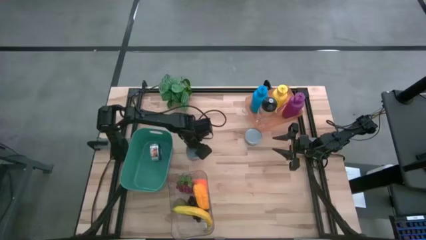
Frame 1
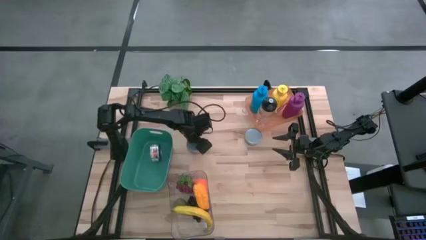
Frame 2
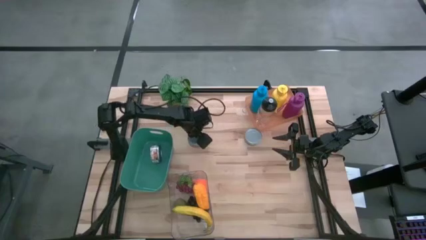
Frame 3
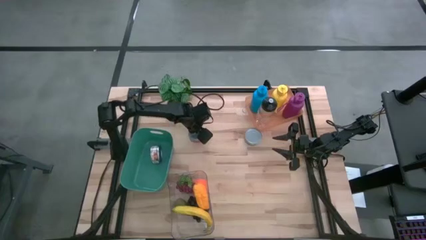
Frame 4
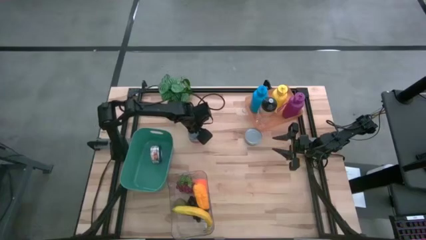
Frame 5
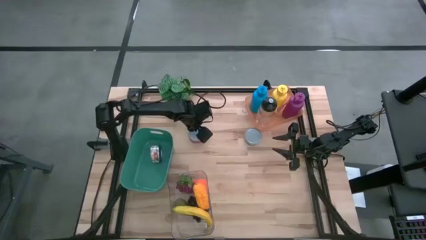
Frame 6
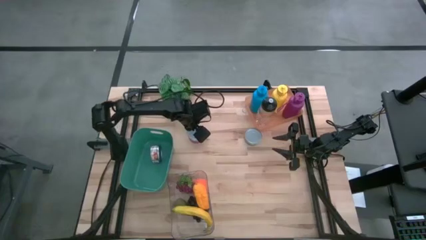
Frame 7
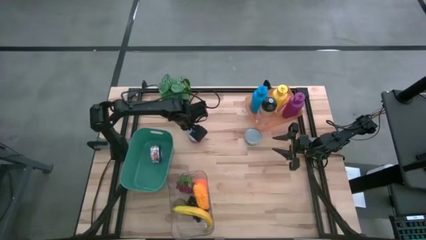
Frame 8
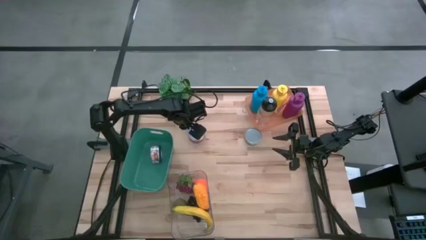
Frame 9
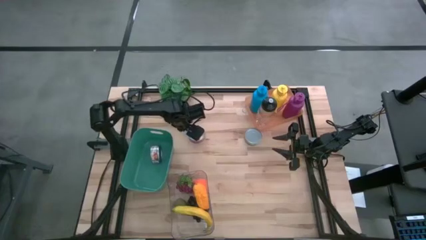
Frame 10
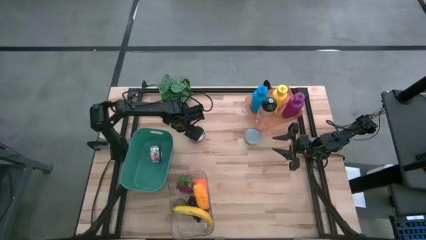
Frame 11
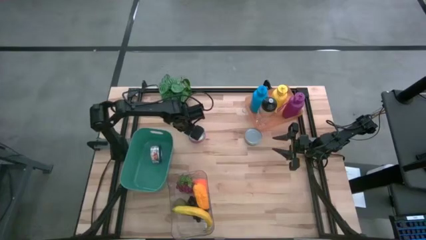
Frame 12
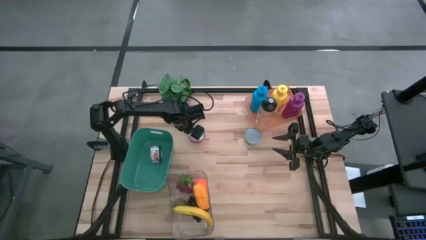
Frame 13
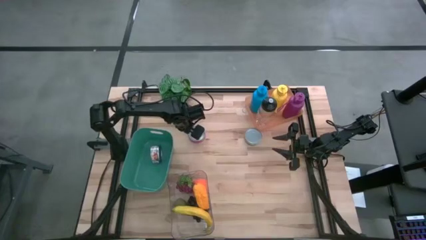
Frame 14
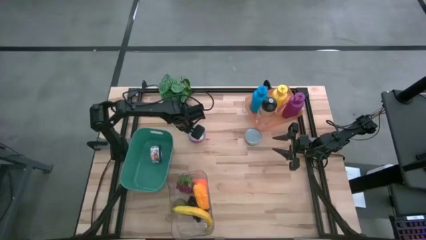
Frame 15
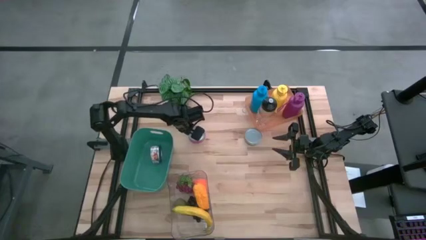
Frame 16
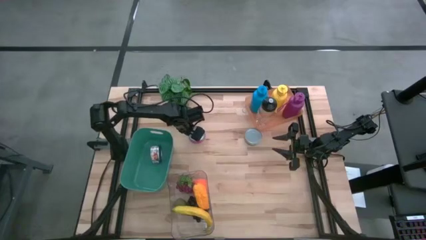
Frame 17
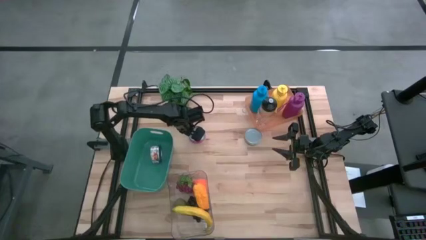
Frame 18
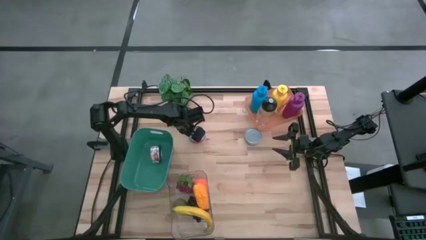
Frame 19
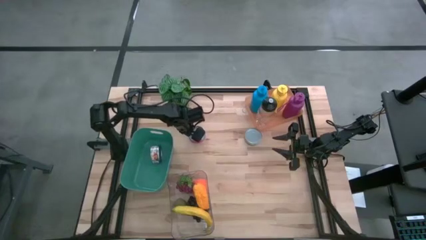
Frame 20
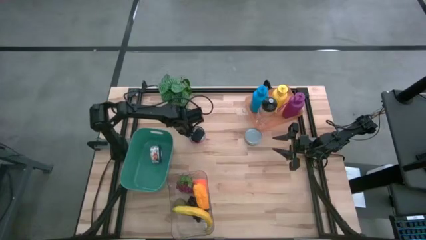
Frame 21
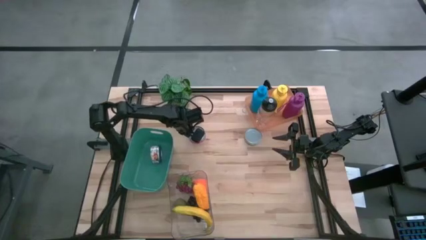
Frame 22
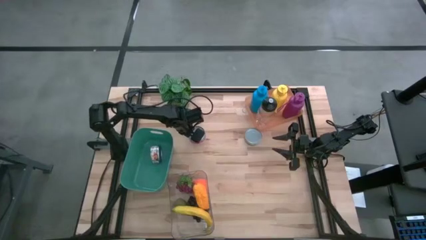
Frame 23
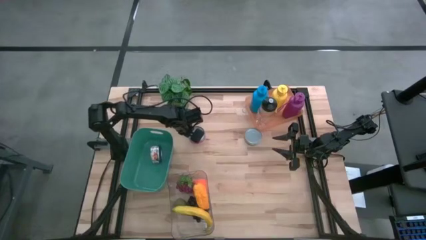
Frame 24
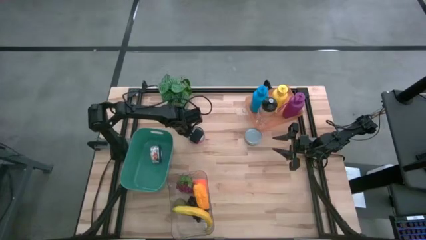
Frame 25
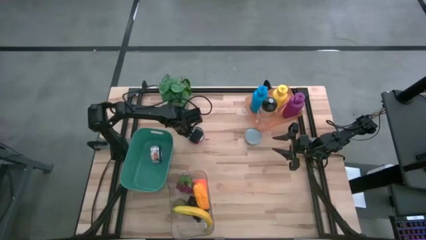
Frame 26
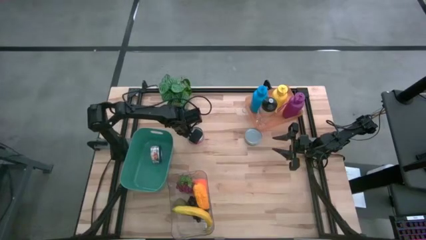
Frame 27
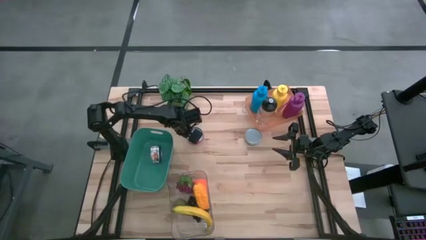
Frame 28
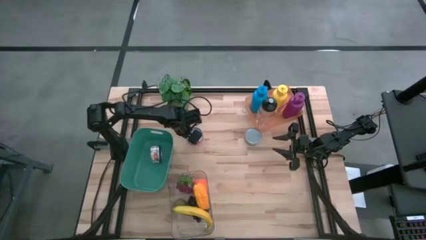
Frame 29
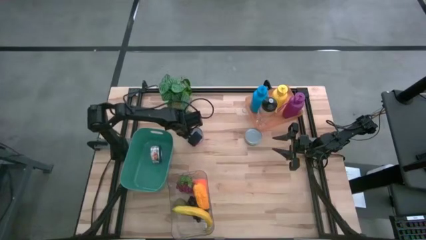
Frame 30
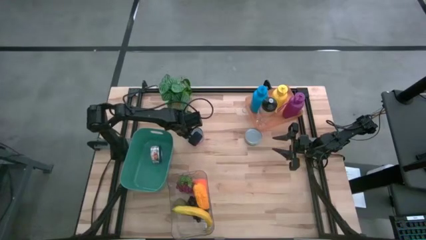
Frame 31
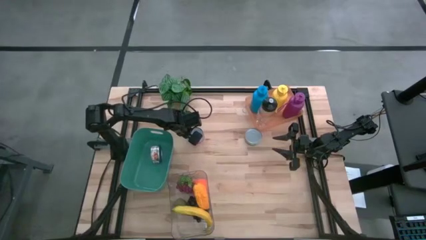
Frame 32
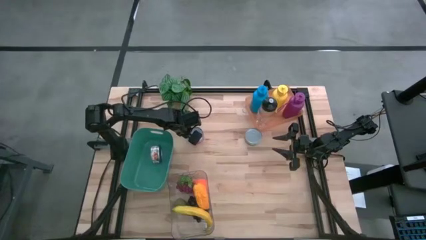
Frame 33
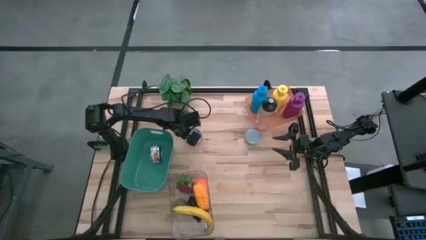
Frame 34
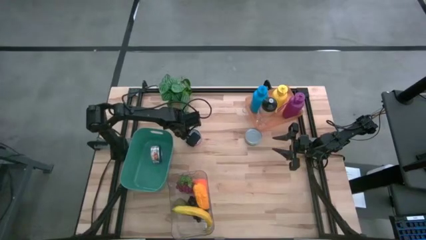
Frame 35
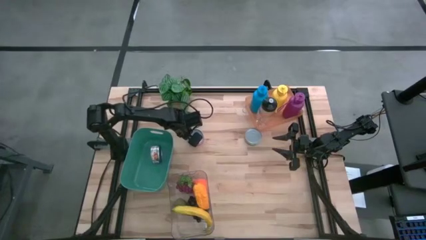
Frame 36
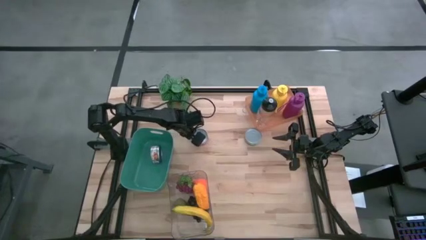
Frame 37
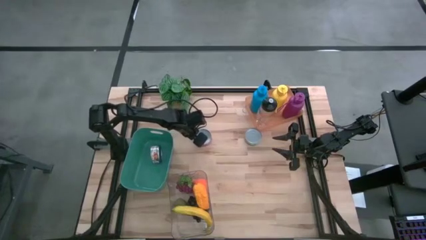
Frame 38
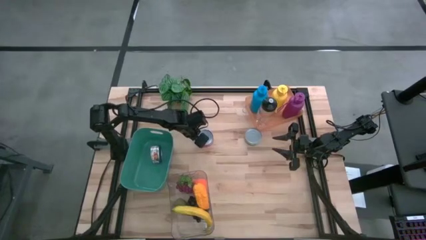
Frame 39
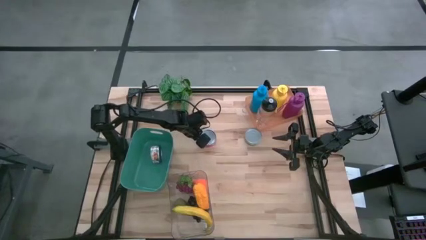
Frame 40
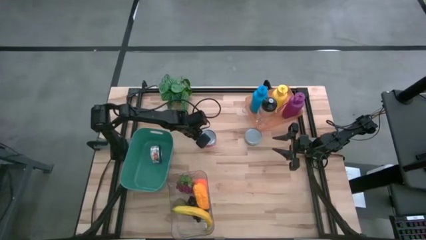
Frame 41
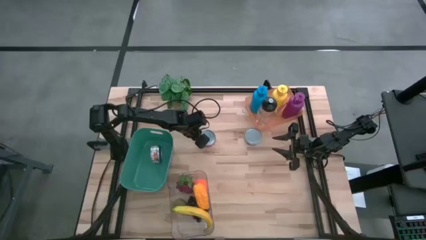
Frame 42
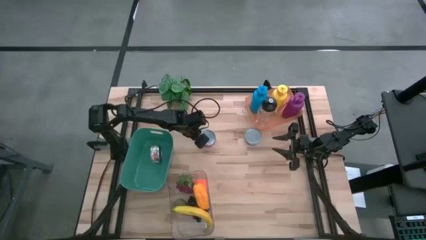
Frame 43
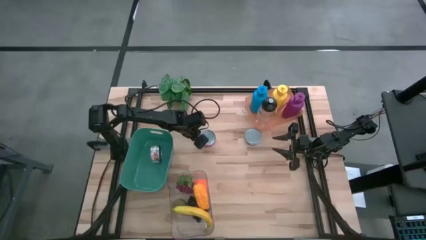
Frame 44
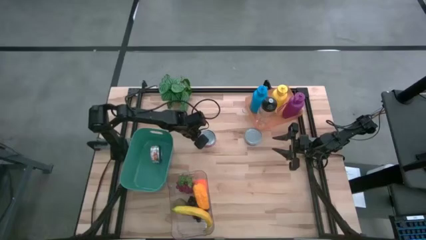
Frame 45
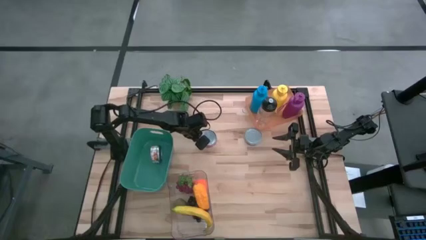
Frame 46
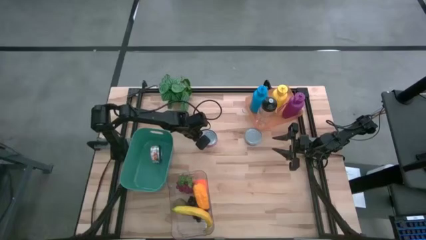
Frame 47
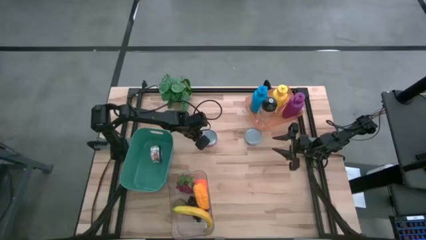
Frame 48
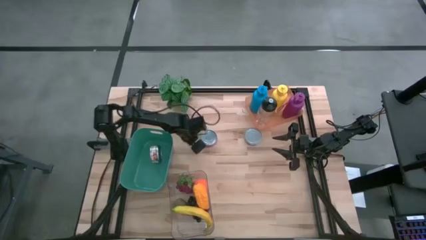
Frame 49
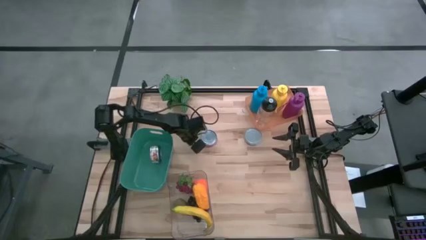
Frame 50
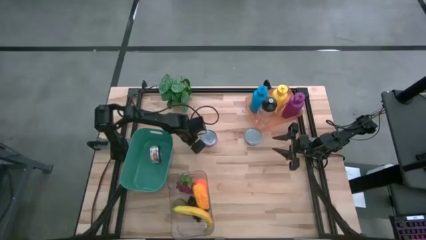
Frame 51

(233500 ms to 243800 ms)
Task: Pick & Place Food Item
Put the red tuna can into the blue bin

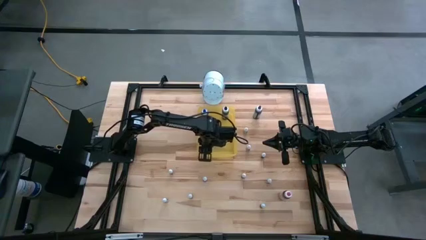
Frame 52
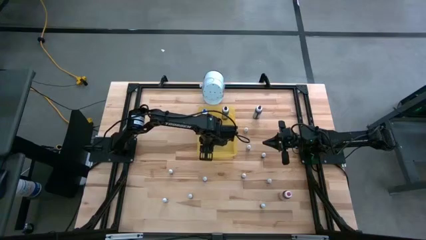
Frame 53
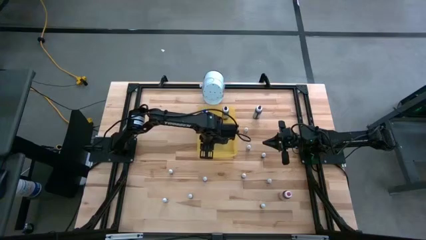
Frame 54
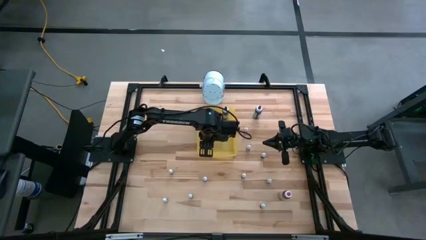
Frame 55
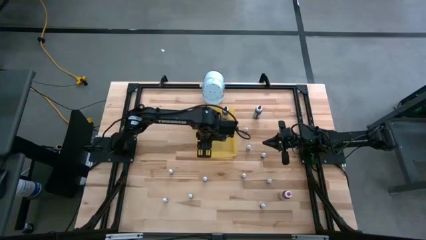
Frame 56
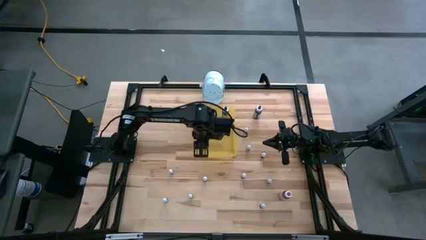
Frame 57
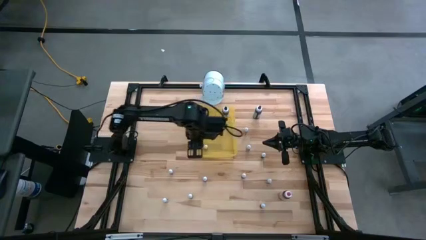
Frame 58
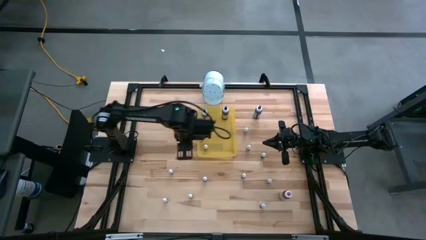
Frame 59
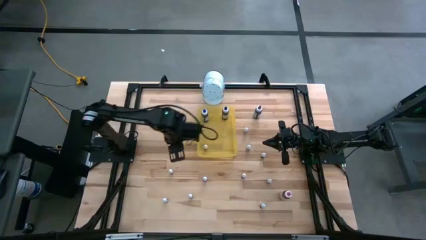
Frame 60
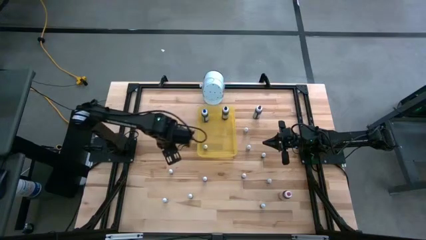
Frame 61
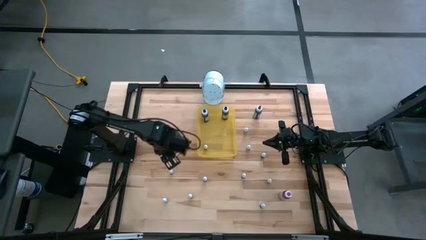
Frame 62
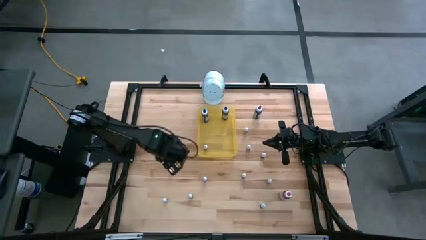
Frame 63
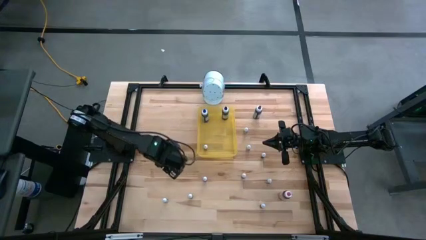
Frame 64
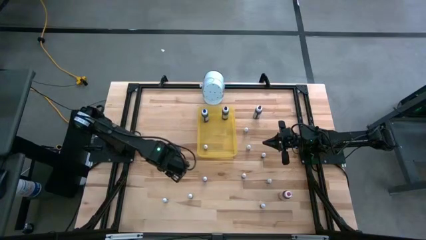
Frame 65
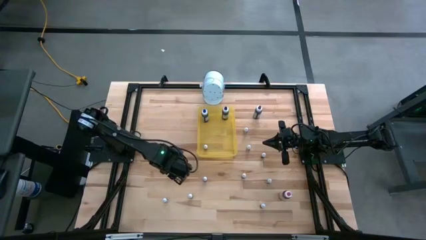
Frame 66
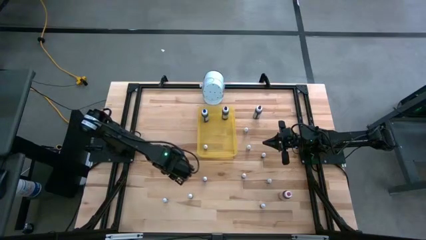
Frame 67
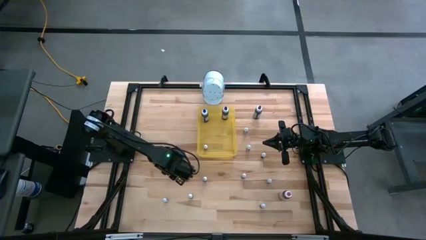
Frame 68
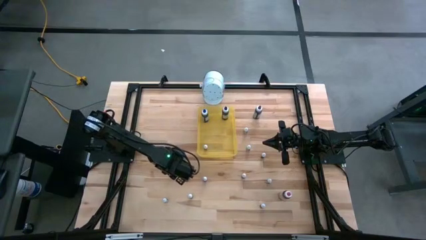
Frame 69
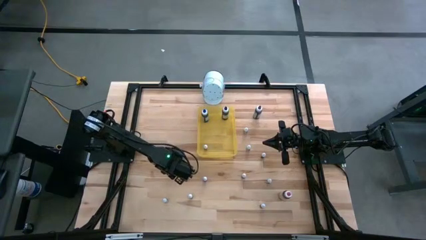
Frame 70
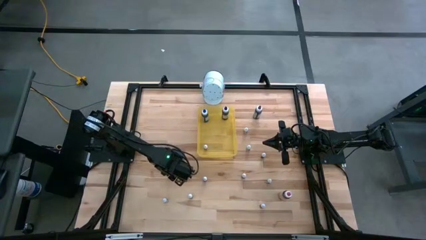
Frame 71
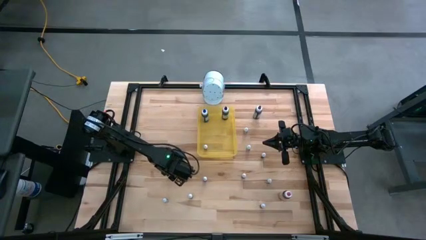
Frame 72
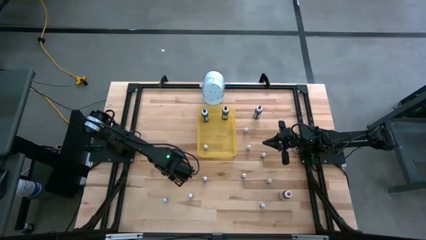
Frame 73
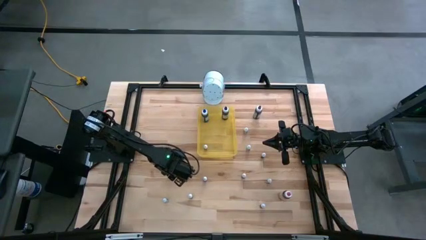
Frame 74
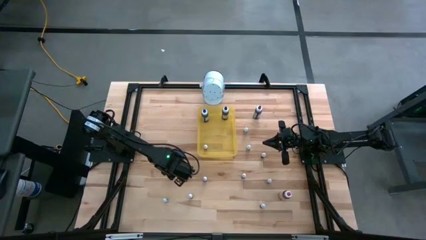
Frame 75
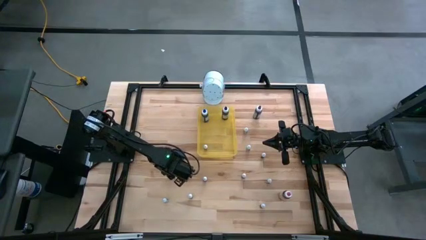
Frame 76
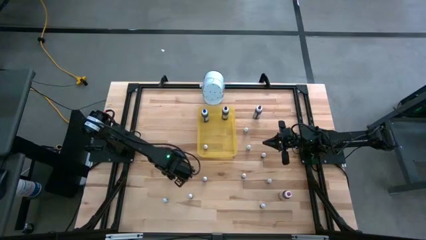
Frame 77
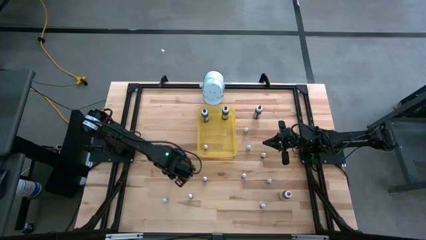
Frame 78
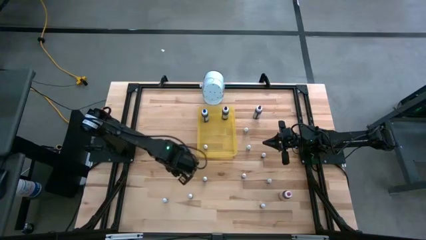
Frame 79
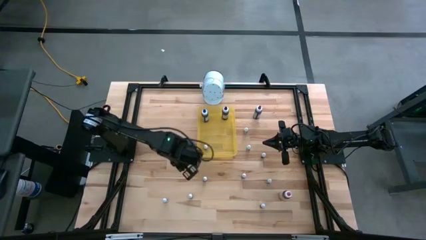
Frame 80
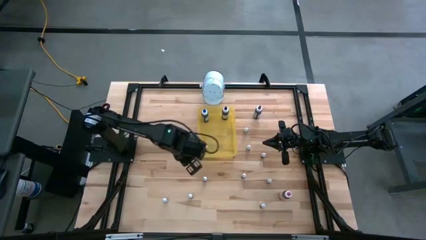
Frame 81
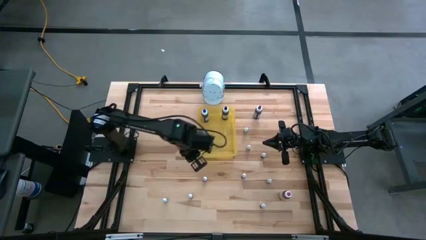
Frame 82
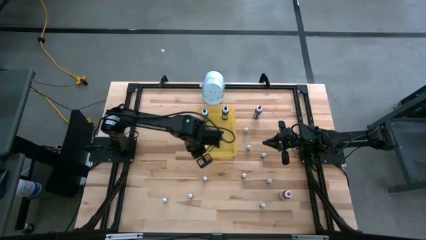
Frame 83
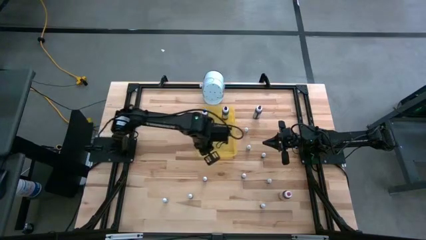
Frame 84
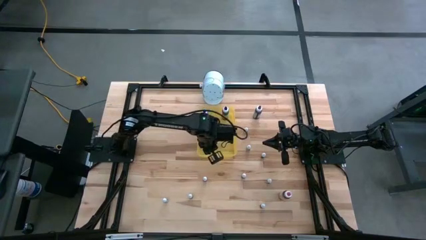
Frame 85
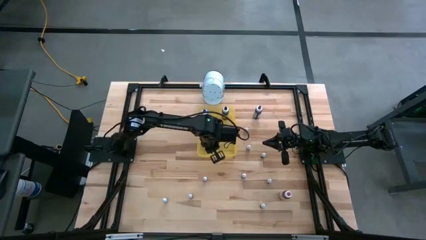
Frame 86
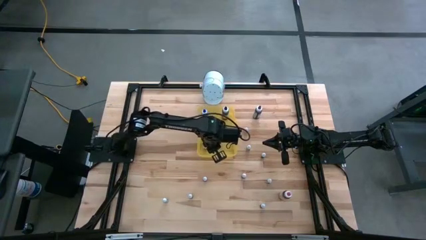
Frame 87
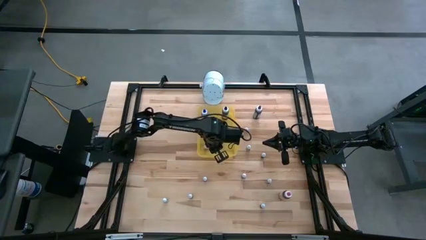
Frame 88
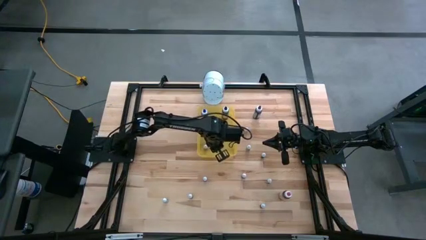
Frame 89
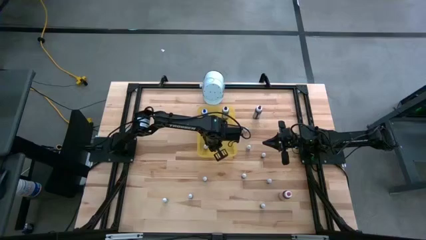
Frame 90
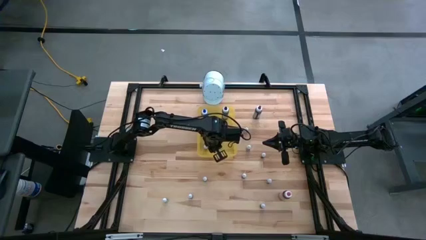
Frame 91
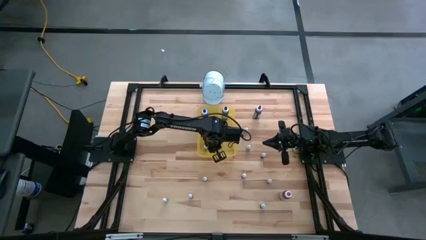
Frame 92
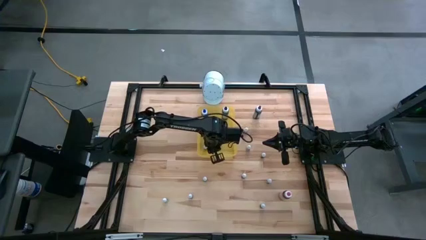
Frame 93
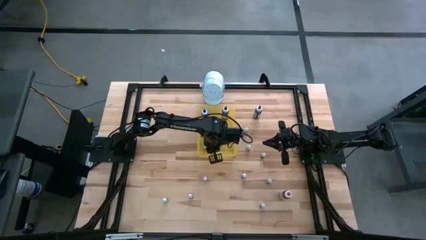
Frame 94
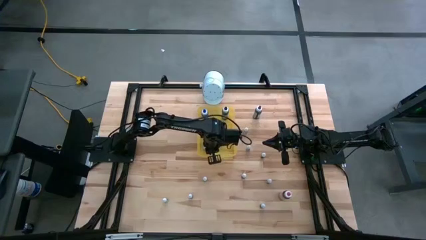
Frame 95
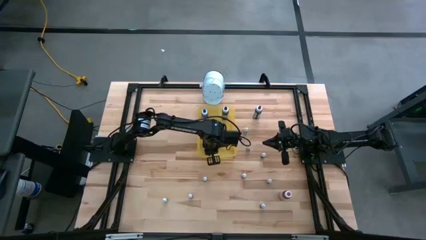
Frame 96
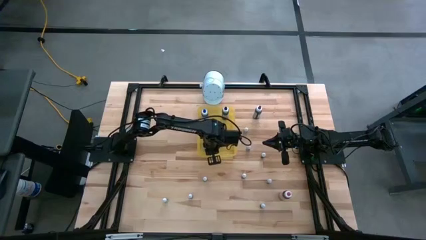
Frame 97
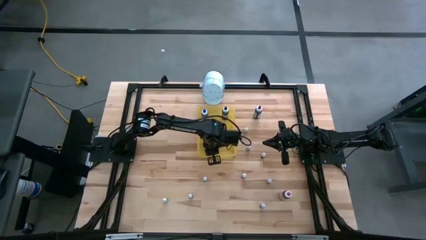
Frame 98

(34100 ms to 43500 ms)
Task: Pick & Place food coloring
Put the small red food coloring bottle in the yellow transparent bin
